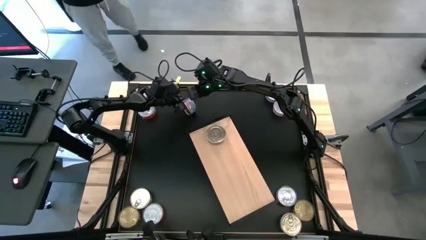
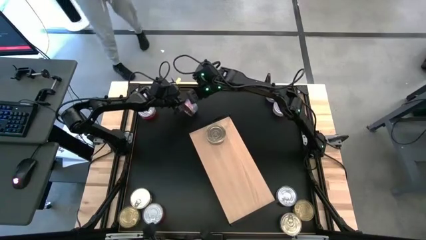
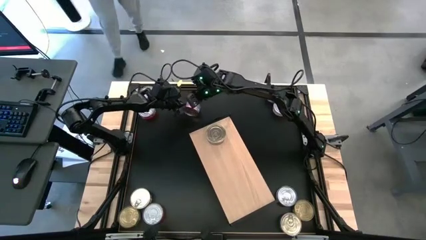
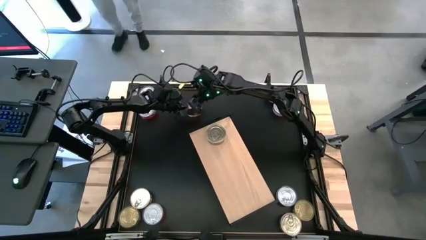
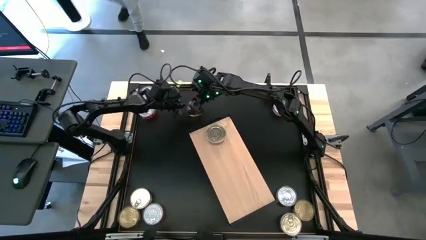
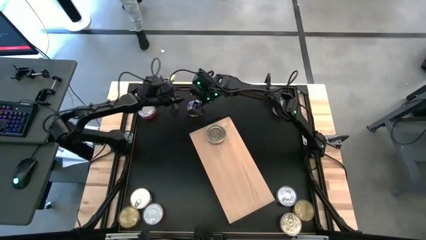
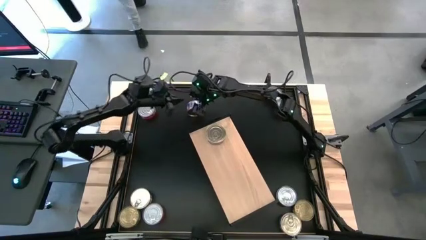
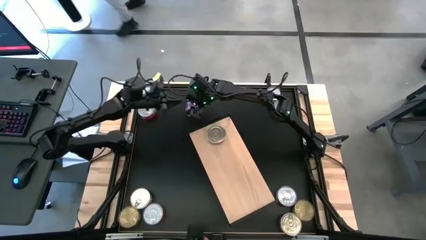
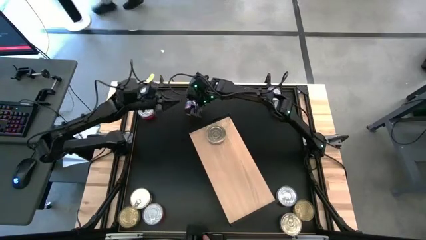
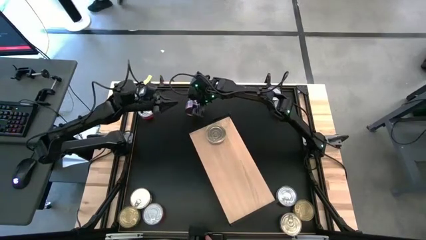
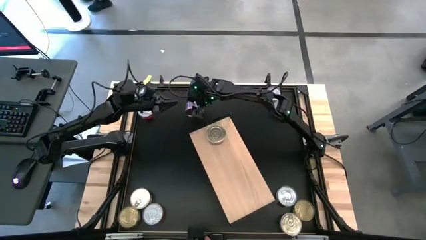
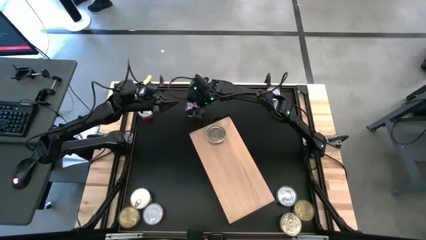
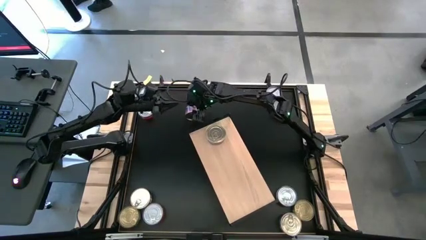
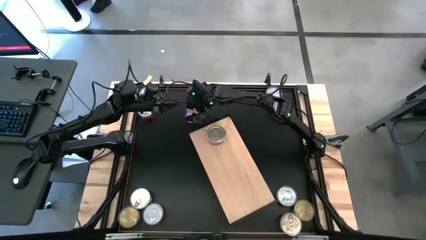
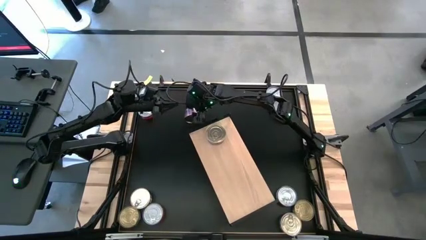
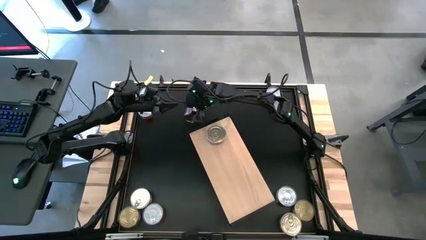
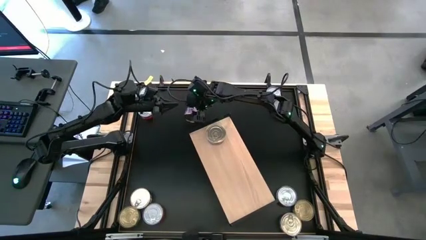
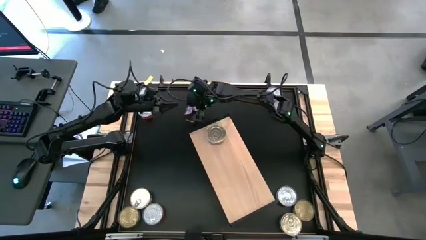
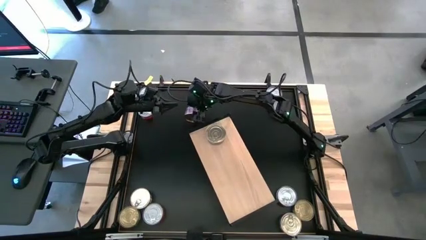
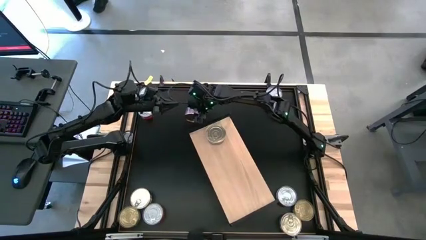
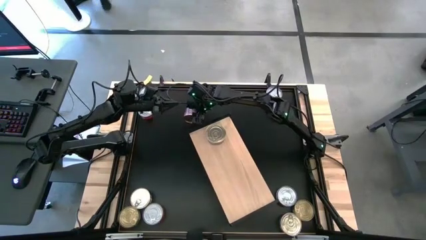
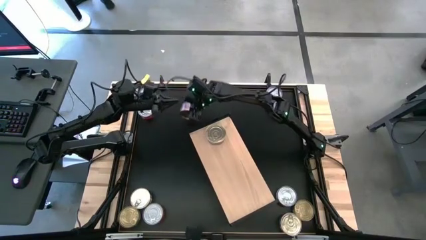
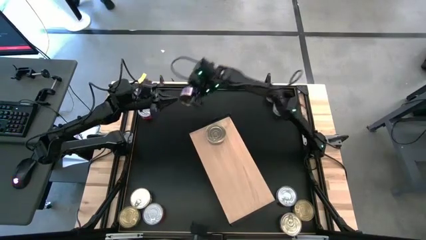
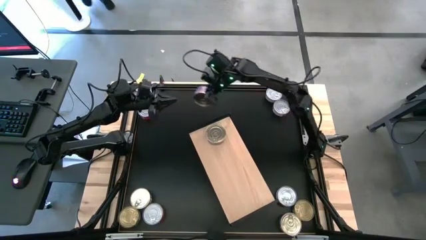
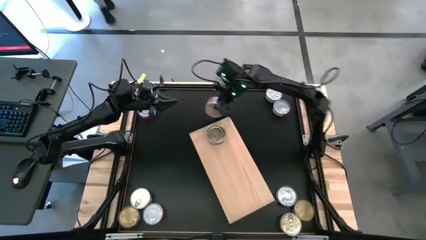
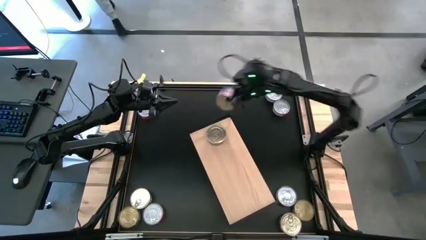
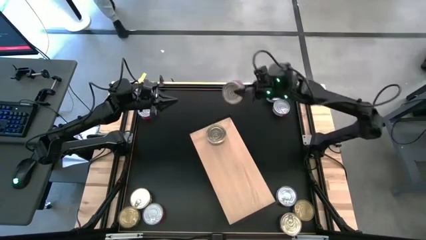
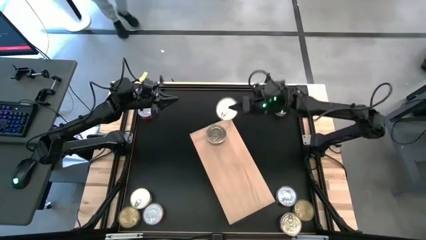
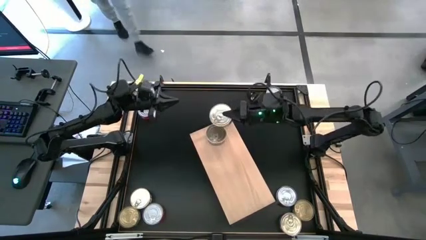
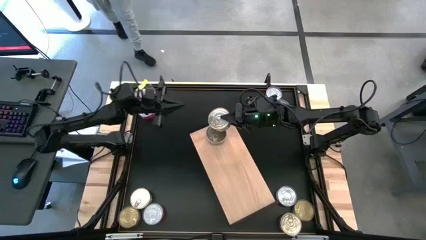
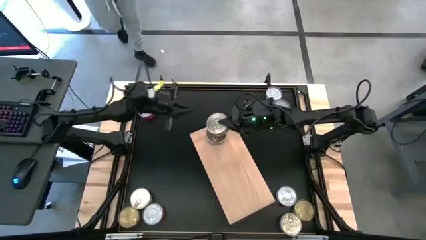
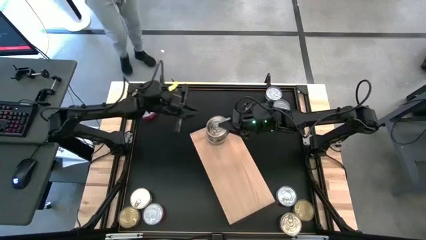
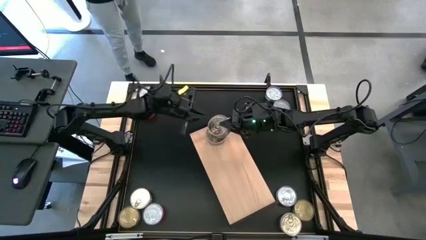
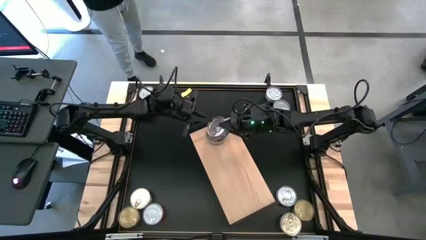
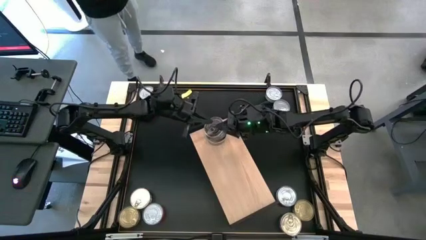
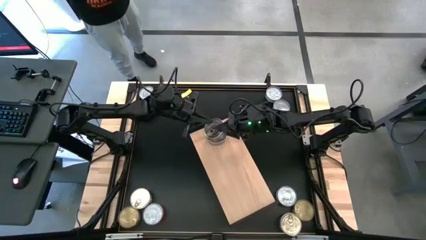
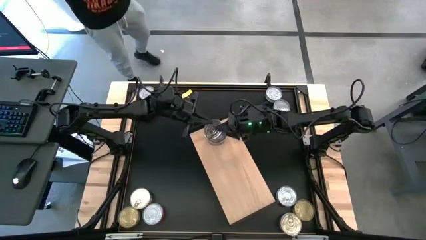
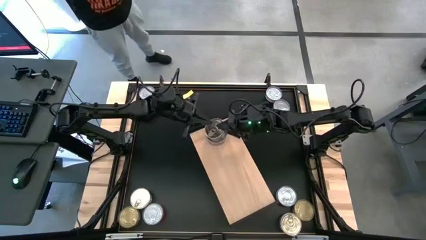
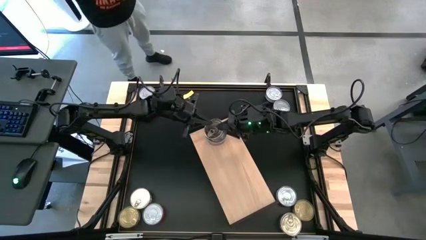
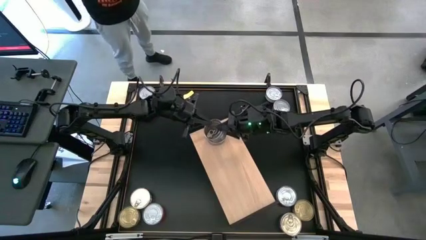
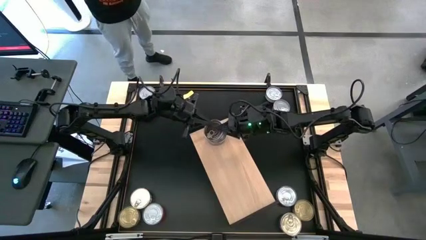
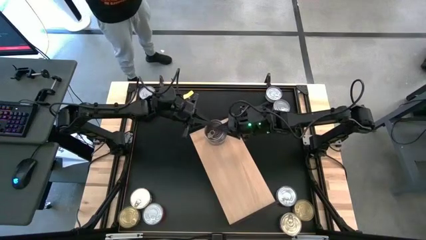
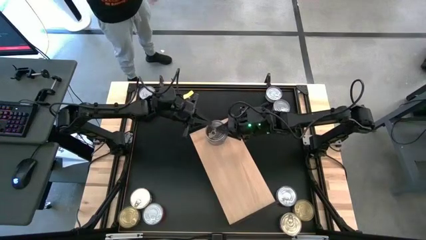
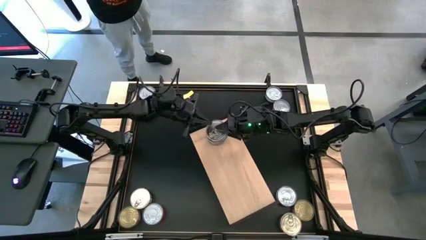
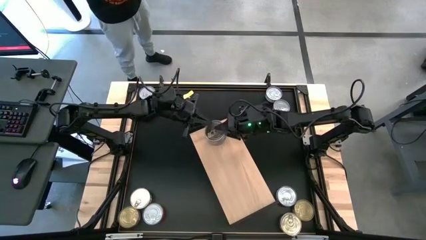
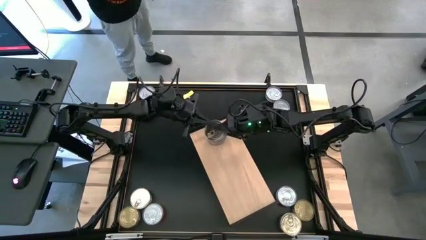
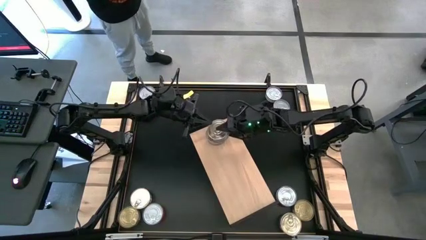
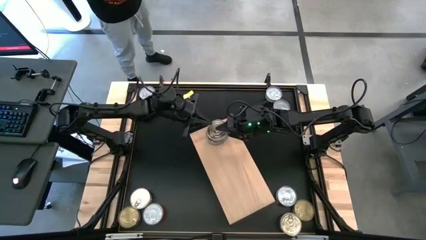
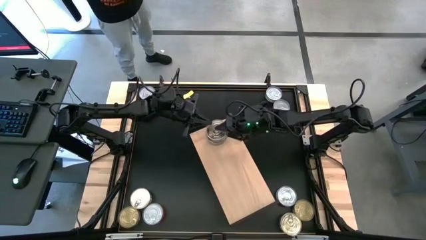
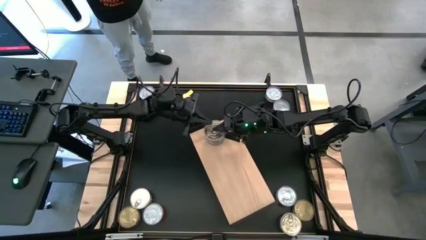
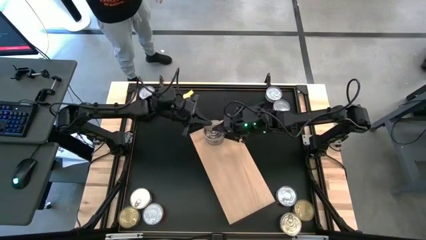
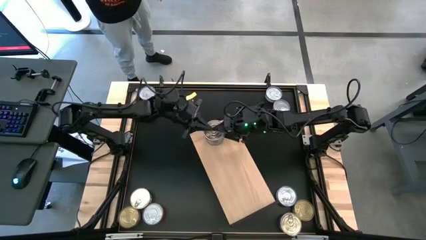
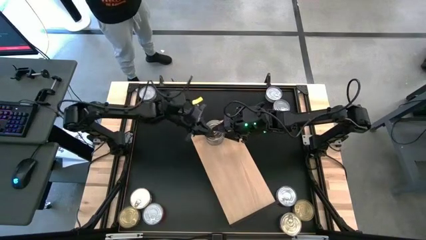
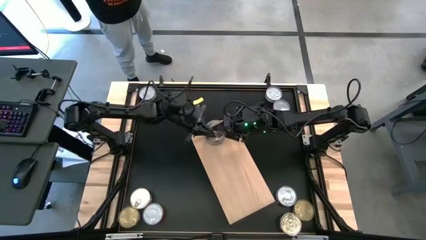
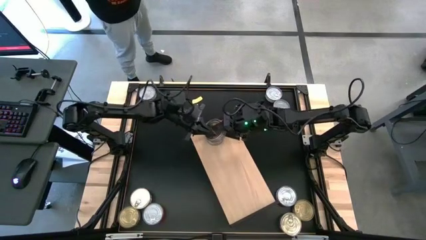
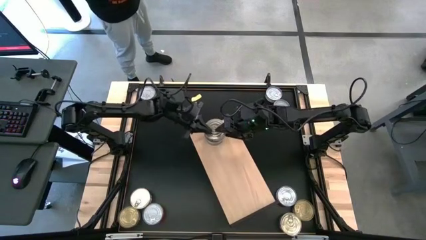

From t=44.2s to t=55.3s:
Task: Stack canned seafood by type on shelf
Stack the blue tuna can on top of blue tuna can on the shelf
